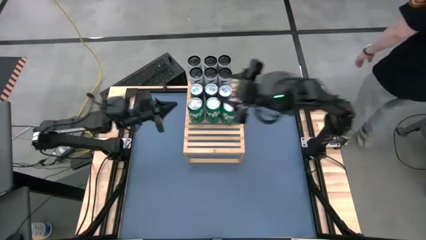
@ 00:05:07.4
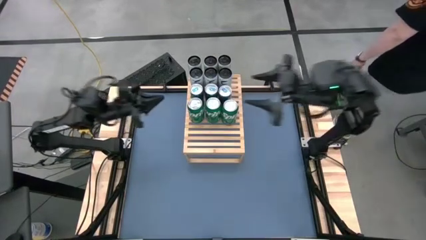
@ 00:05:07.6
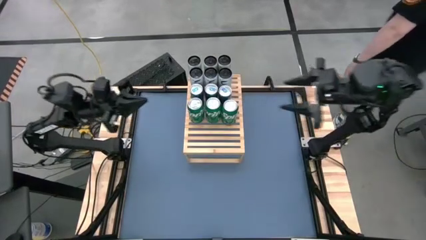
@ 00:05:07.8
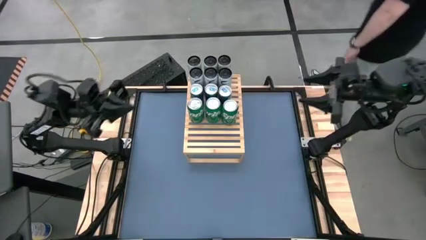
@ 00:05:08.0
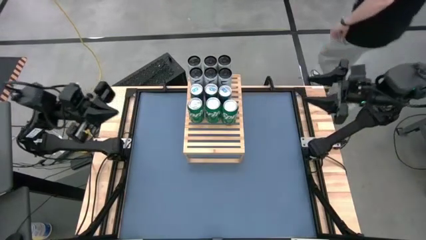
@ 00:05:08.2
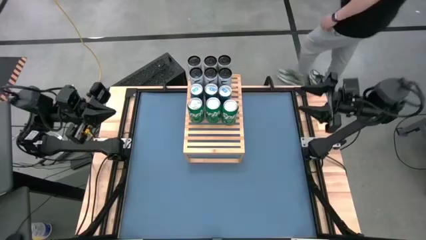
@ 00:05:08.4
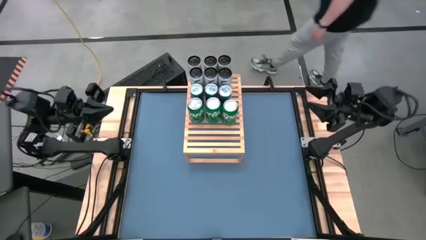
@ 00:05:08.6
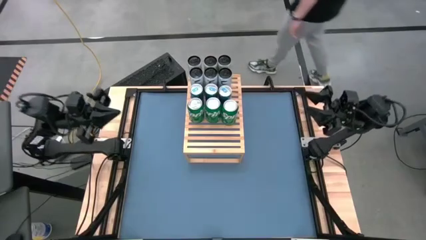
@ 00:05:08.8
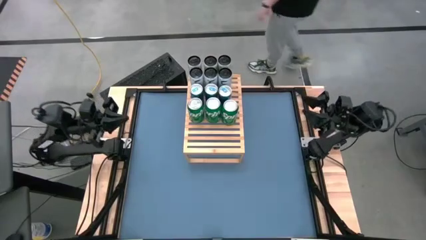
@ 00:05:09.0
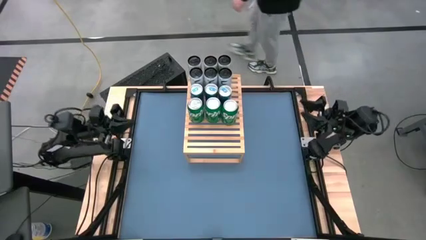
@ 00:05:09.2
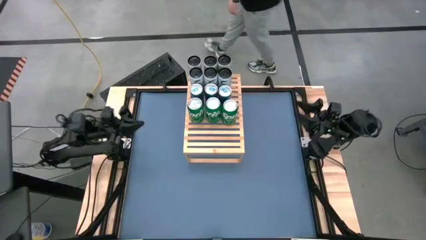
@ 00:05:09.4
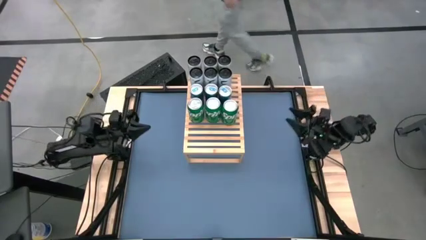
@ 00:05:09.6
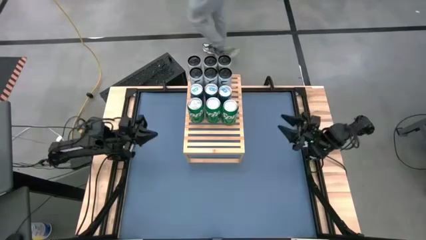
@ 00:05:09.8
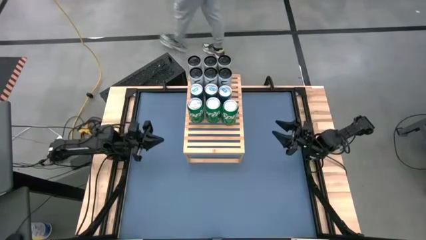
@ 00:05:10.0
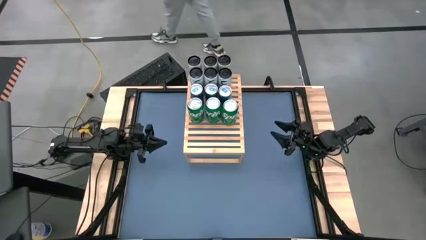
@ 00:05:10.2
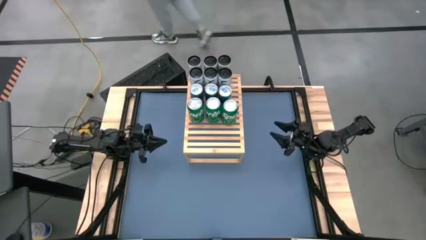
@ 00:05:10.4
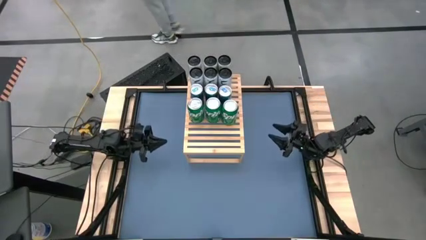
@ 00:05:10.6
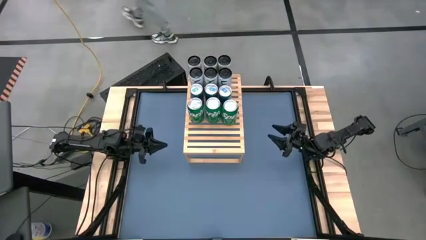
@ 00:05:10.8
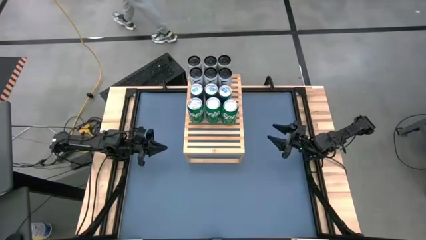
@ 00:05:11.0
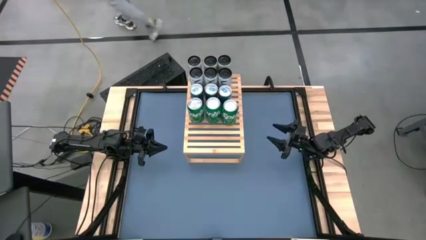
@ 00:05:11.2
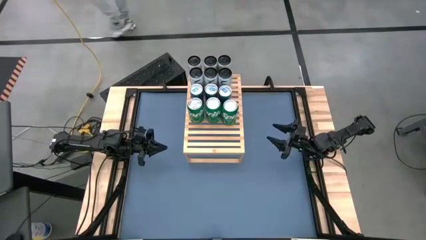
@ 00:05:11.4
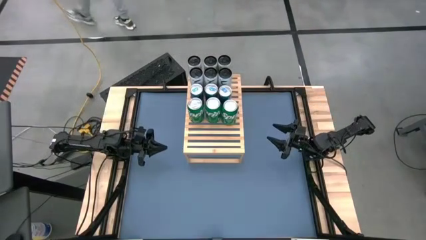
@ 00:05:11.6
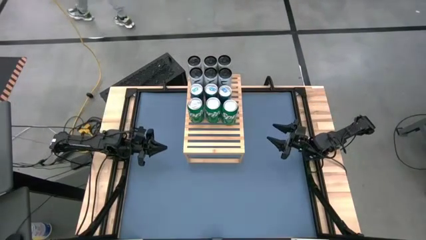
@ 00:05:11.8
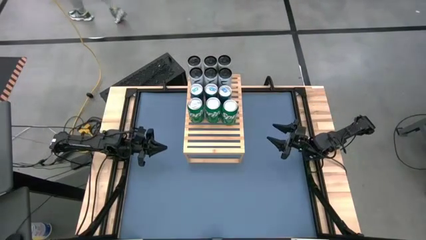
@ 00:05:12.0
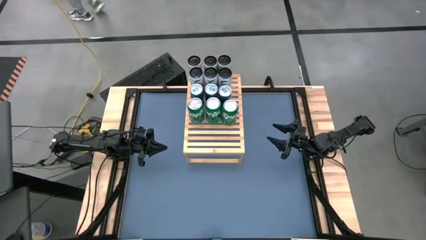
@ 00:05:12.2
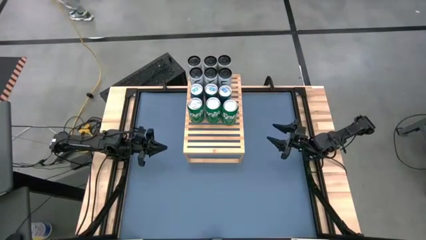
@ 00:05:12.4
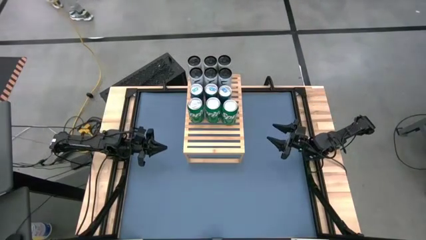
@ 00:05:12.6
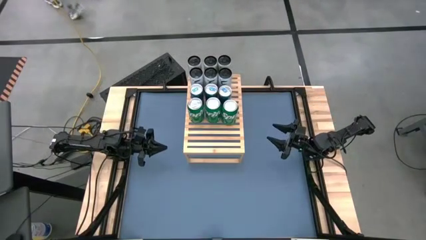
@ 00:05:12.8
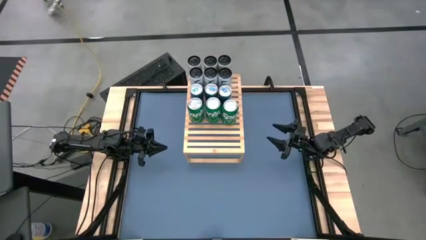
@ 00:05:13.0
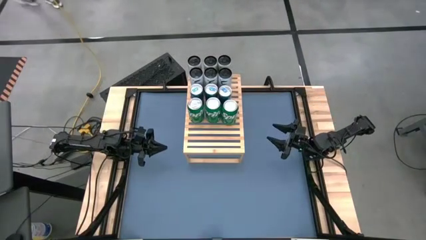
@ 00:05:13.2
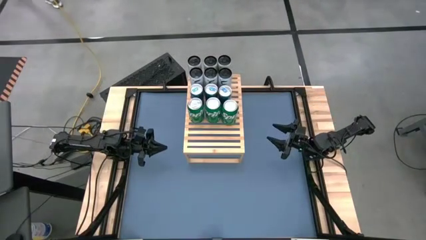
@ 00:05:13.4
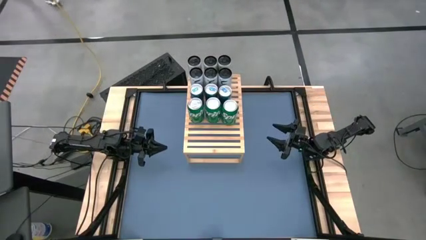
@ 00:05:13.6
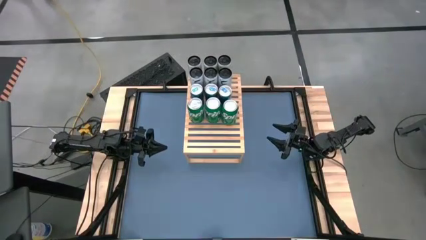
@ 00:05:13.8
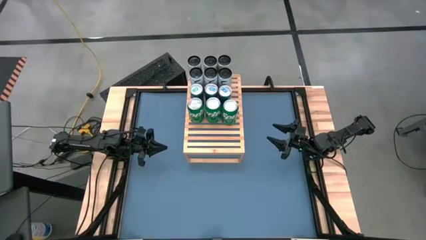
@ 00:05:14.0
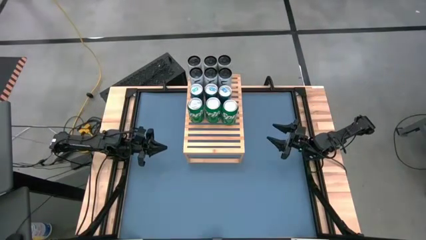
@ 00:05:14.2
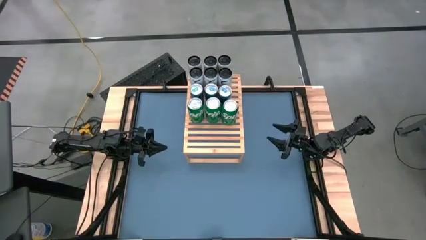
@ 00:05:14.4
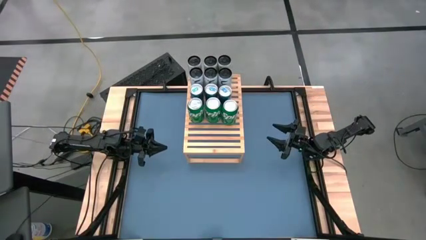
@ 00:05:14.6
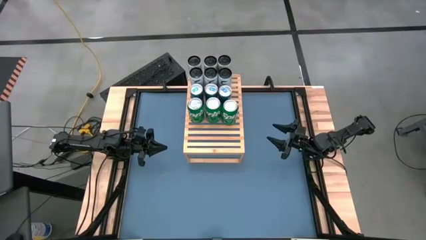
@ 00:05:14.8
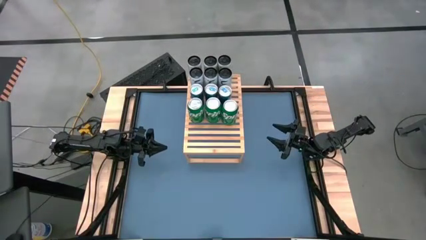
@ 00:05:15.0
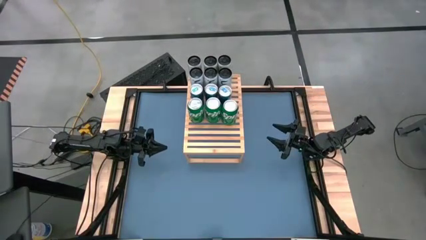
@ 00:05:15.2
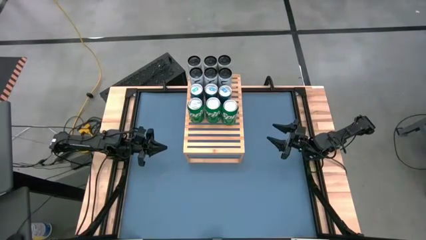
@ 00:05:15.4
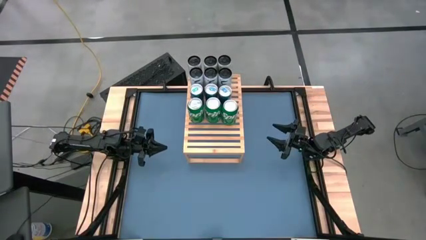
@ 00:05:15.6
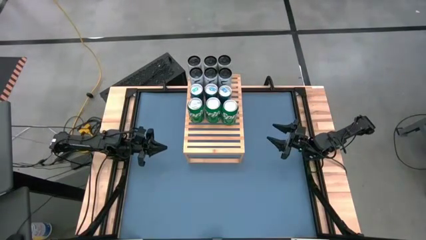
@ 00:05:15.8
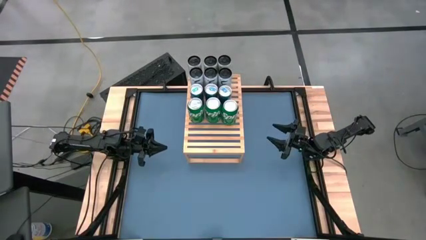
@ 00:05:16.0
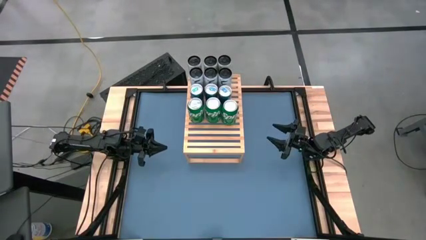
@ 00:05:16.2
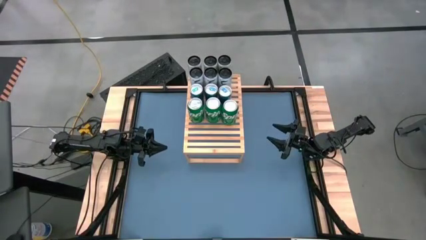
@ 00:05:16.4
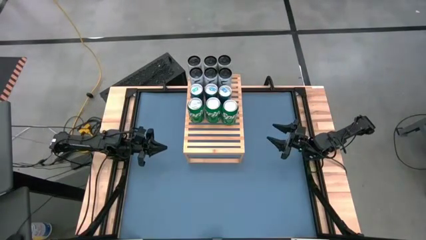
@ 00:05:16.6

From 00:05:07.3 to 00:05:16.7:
Task: Place canned beverage on shelf
Return to Home Position
